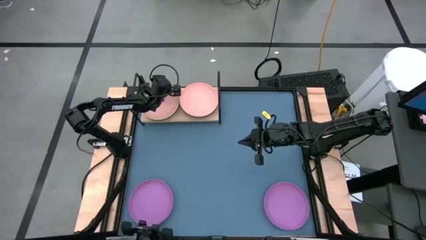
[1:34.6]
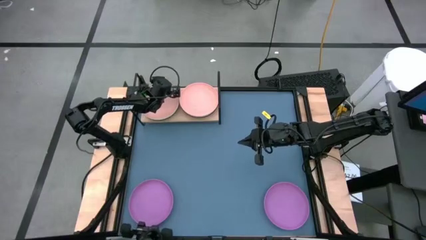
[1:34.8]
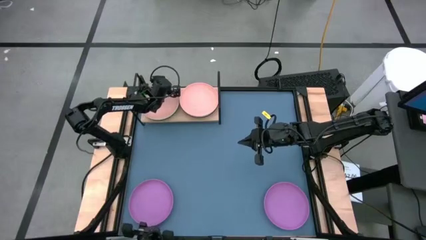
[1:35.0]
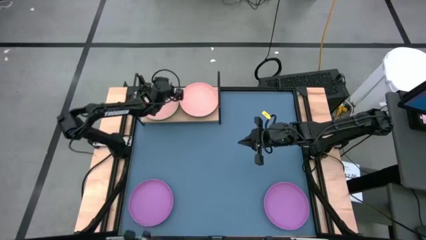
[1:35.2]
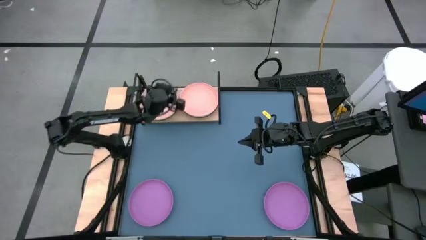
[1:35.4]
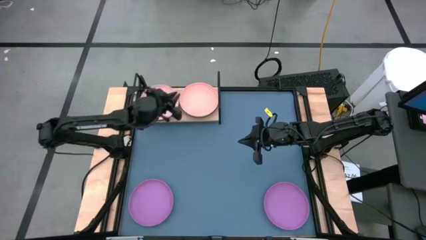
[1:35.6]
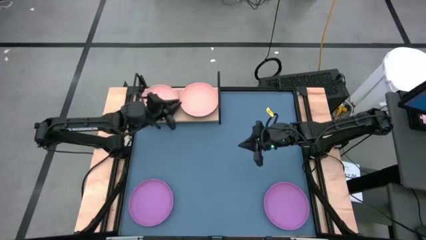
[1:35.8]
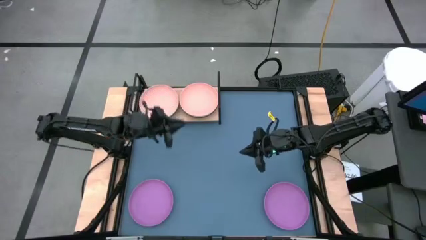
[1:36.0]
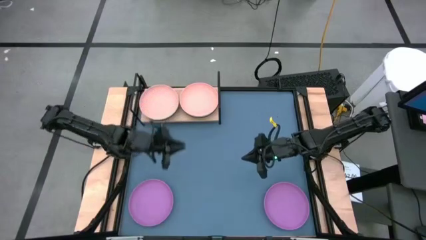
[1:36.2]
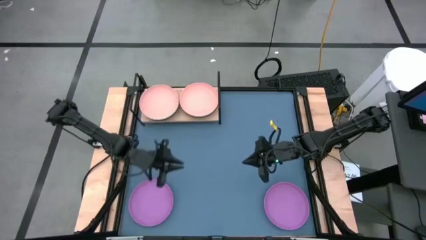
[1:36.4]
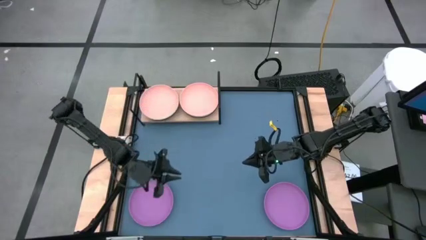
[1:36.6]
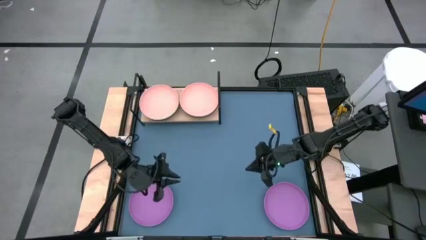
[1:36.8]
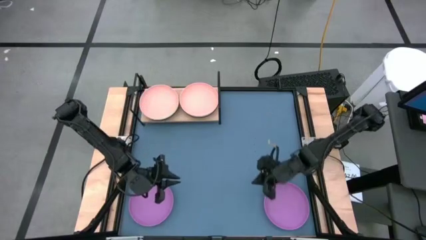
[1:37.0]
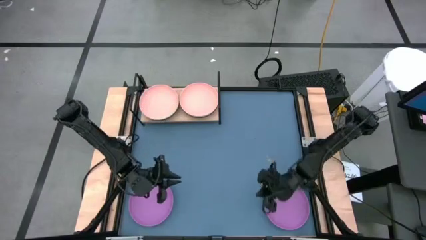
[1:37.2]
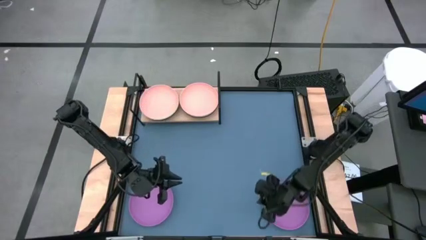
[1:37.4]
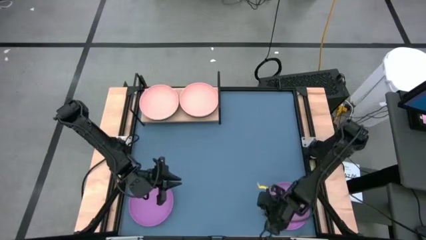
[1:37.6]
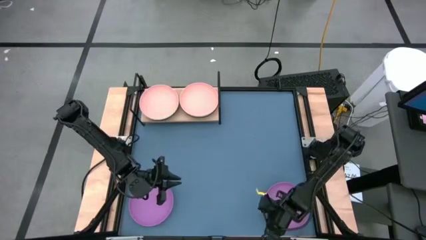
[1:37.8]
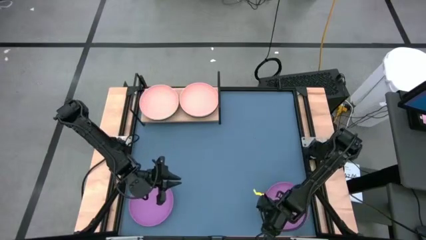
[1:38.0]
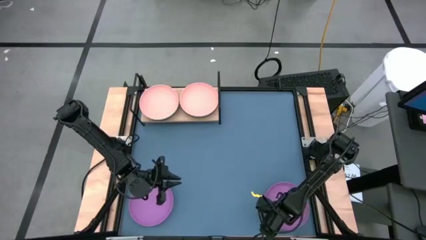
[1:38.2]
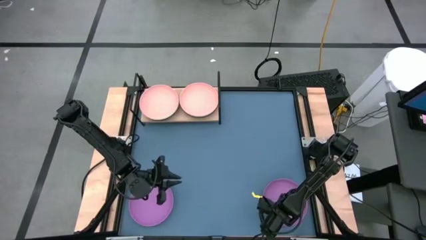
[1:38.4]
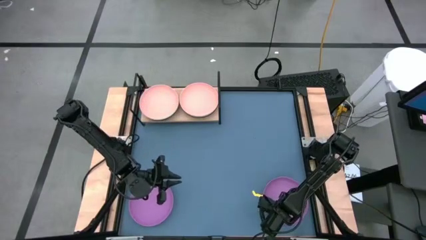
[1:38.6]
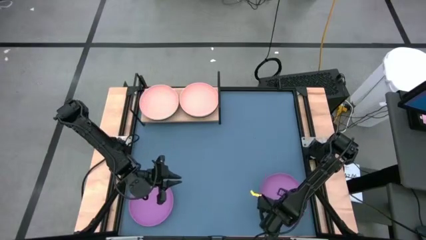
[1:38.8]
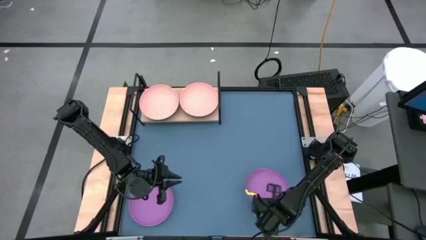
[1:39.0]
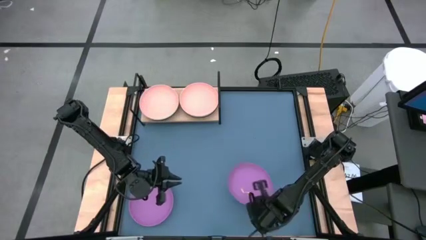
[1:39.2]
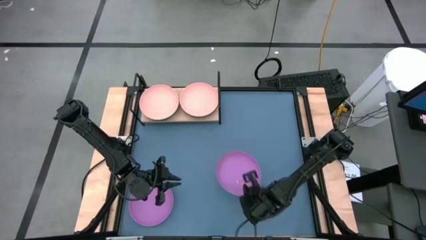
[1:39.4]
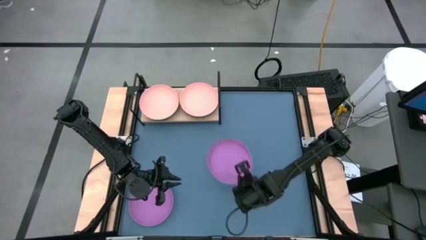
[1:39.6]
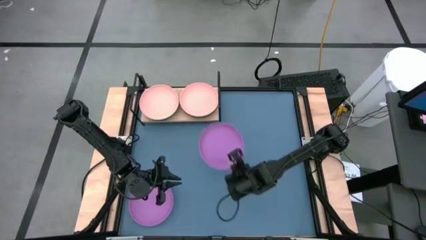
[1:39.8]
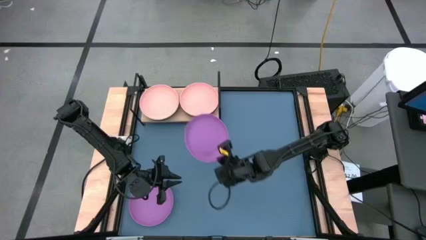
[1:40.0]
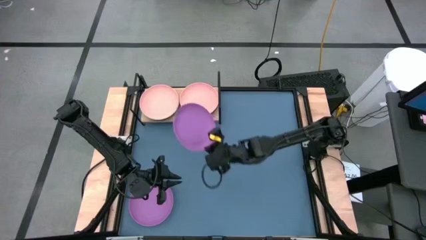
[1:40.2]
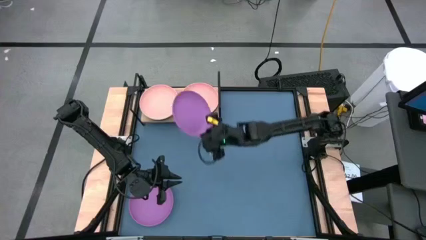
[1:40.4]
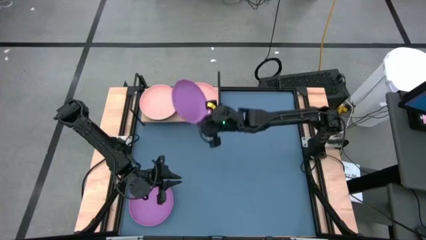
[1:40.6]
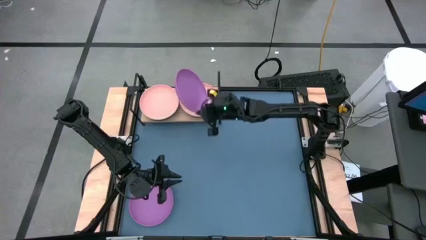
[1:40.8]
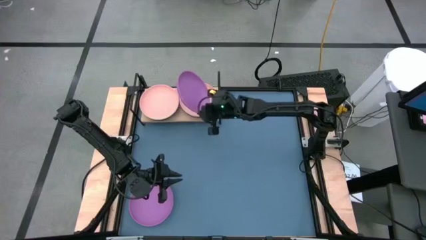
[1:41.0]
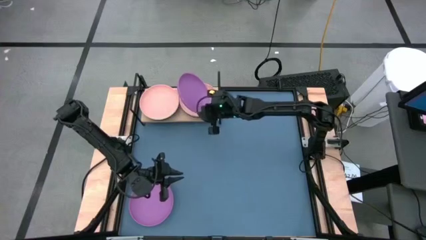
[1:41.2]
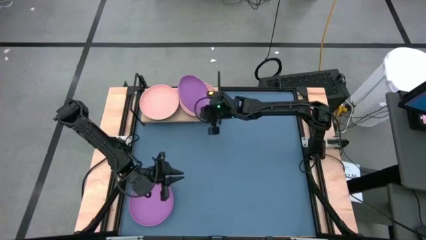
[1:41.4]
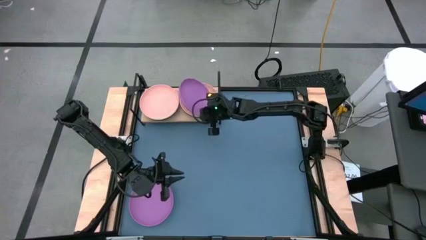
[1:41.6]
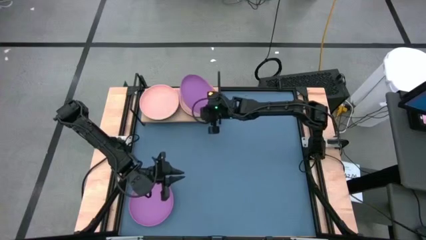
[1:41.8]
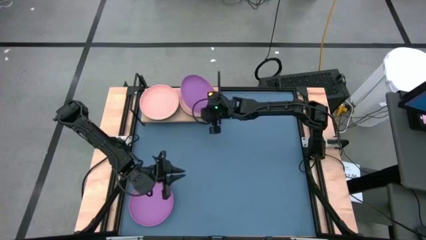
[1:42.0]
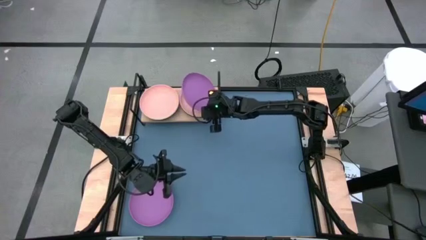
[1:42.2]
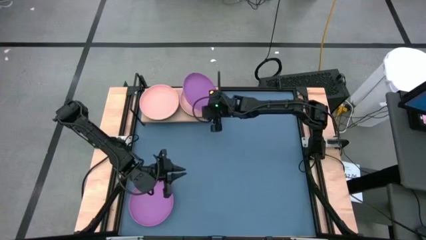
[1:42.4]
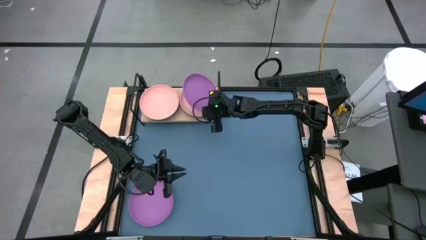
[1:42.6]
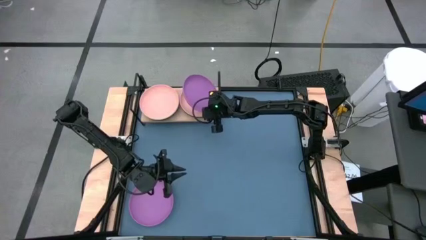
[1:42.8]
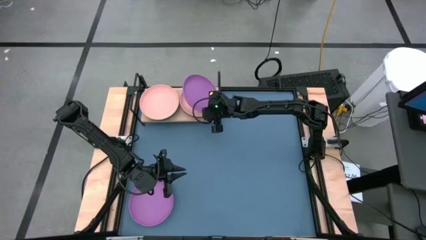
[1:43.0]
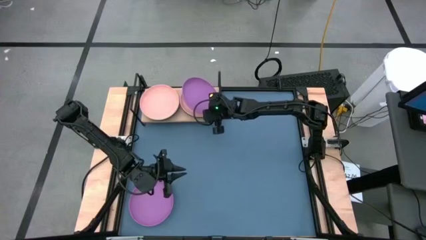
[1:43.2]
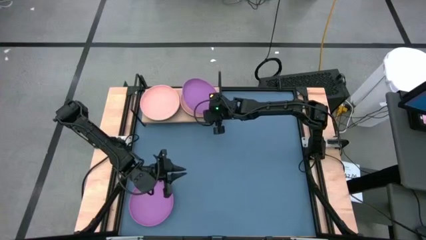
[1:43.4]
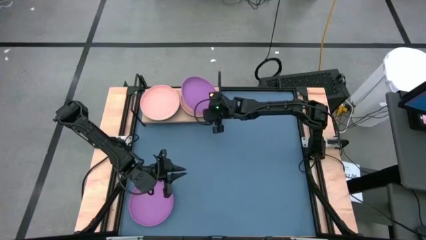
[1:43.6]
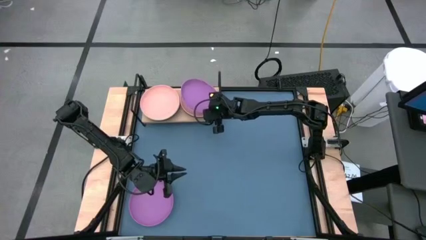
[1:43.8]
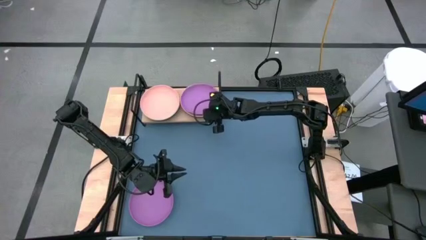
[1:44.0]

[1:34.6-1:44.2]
Task: Place and stack plates onto a shelf
Stack the right purple plate on top of the right light pink plate on the shelf

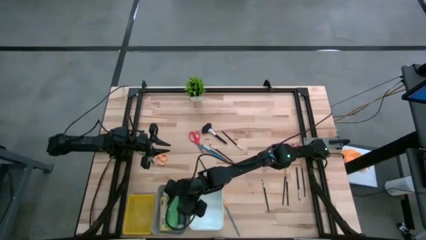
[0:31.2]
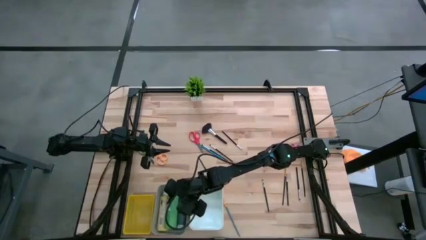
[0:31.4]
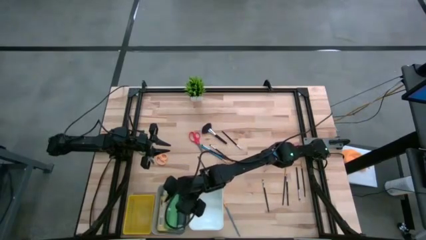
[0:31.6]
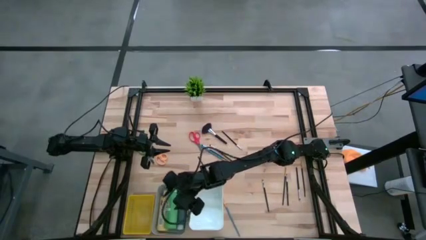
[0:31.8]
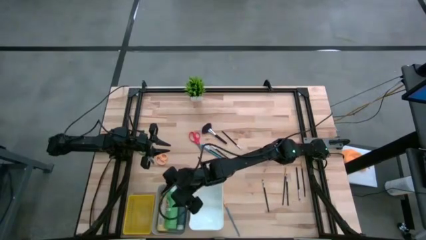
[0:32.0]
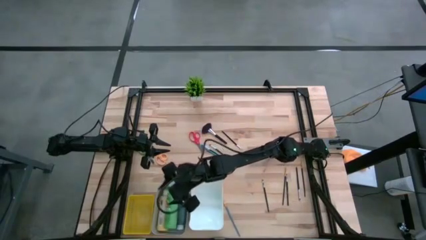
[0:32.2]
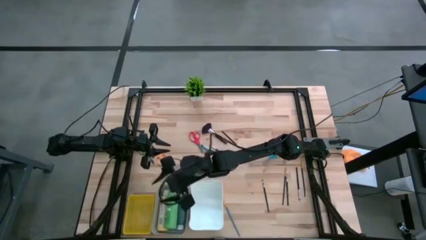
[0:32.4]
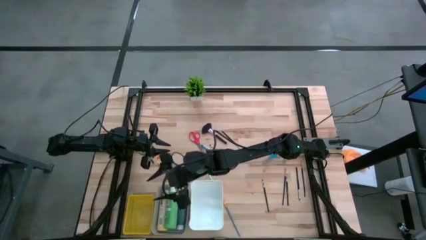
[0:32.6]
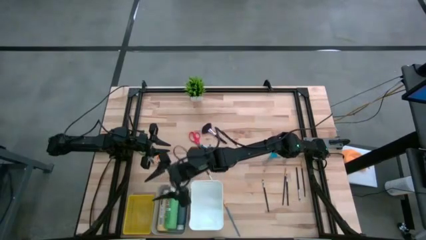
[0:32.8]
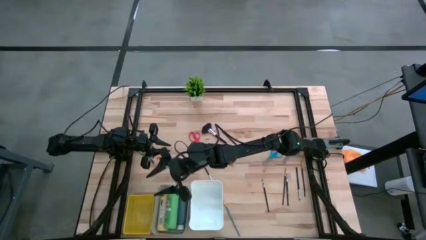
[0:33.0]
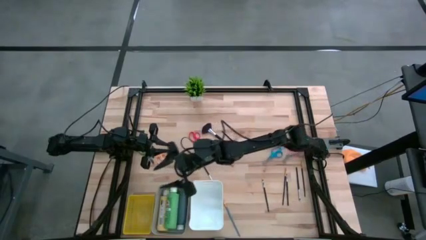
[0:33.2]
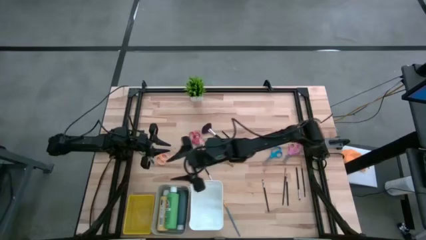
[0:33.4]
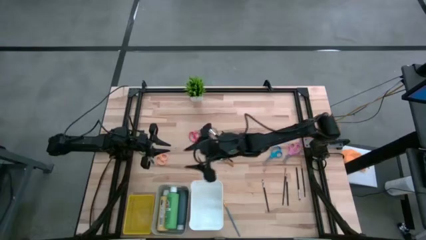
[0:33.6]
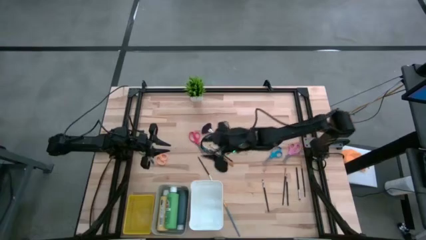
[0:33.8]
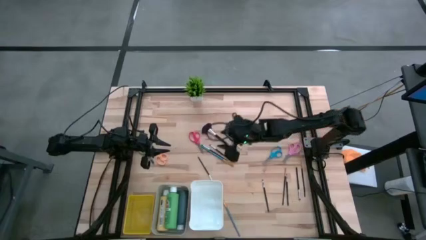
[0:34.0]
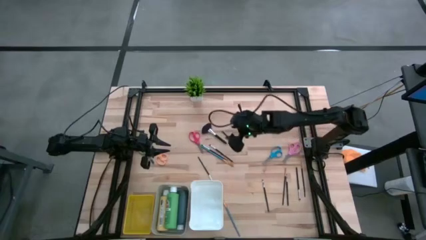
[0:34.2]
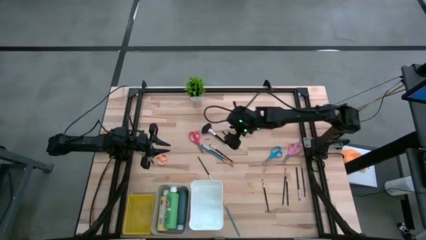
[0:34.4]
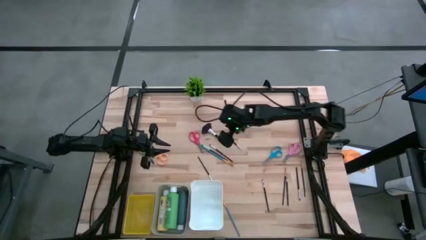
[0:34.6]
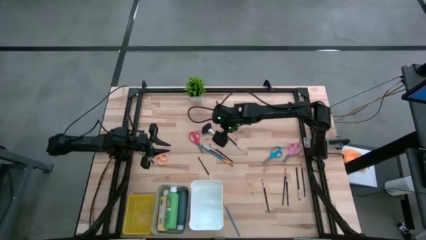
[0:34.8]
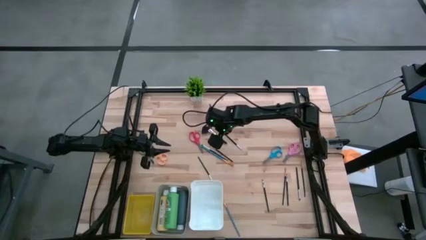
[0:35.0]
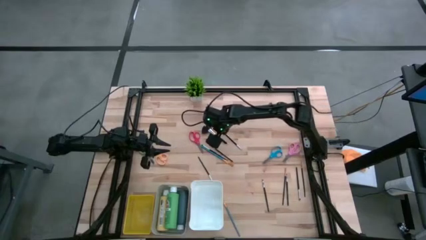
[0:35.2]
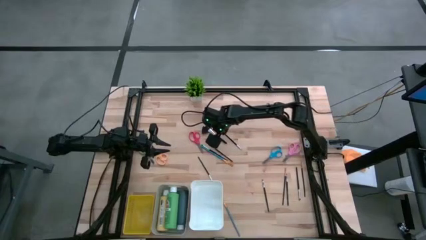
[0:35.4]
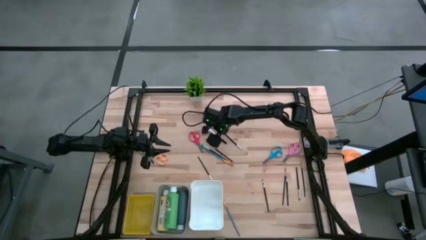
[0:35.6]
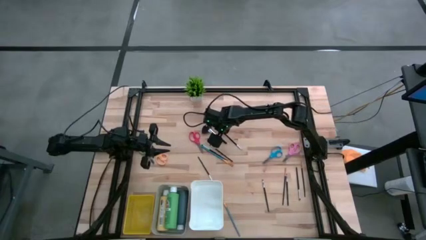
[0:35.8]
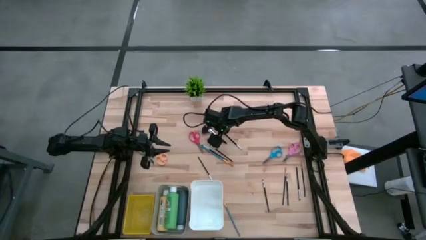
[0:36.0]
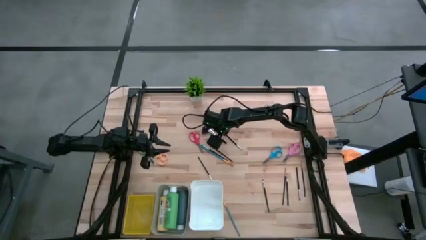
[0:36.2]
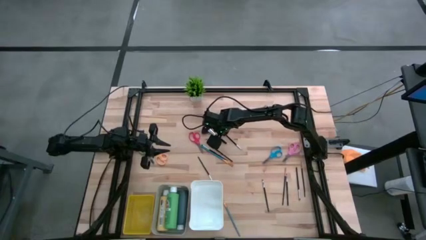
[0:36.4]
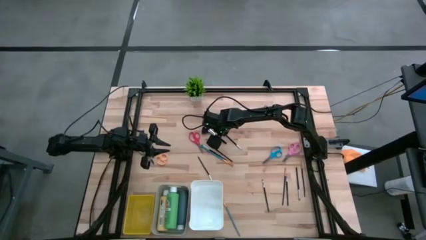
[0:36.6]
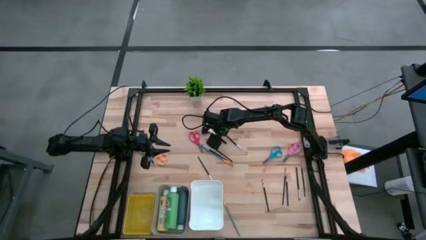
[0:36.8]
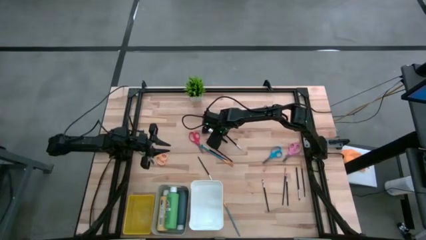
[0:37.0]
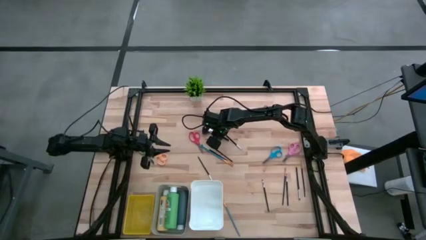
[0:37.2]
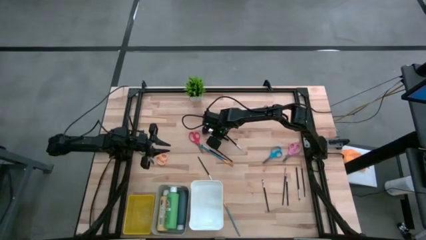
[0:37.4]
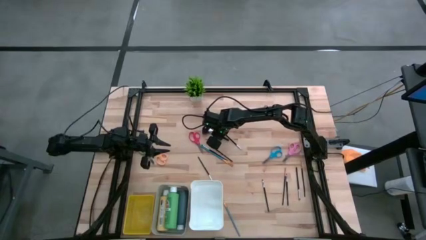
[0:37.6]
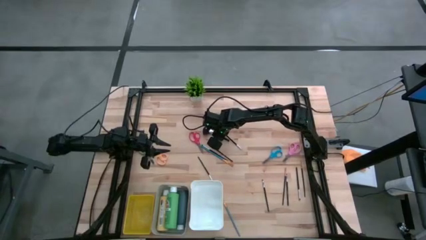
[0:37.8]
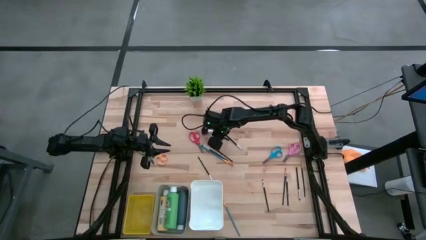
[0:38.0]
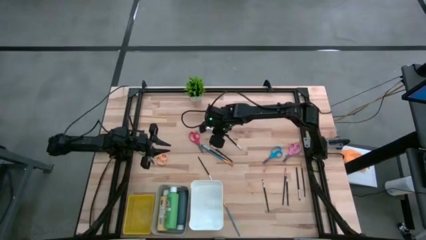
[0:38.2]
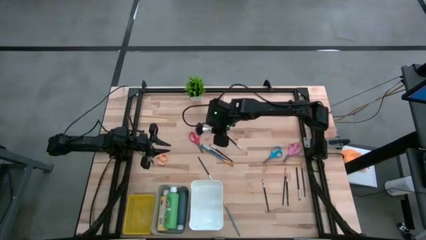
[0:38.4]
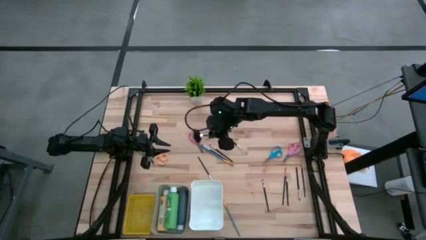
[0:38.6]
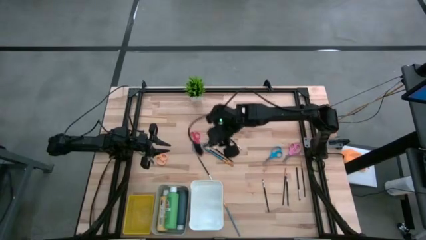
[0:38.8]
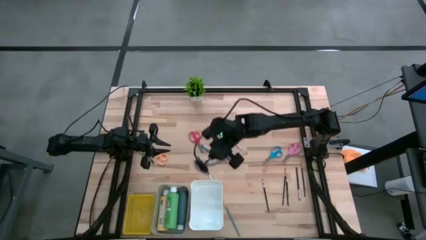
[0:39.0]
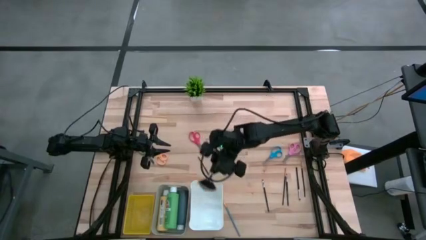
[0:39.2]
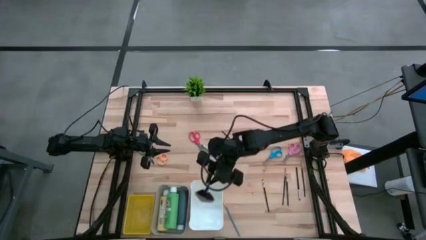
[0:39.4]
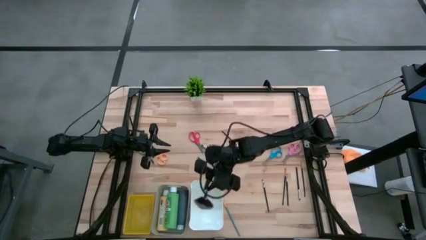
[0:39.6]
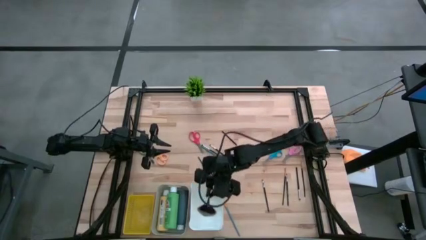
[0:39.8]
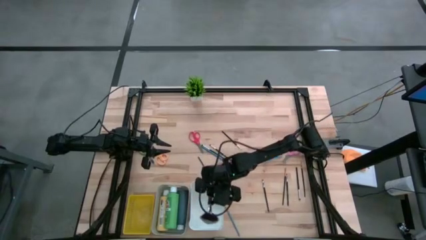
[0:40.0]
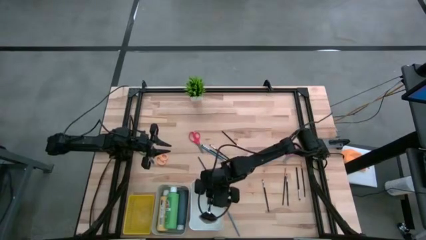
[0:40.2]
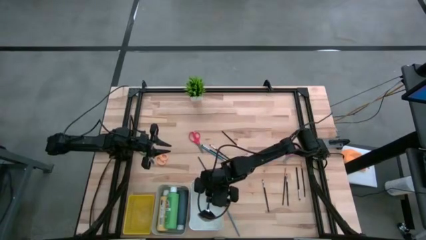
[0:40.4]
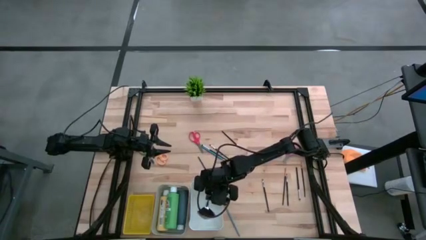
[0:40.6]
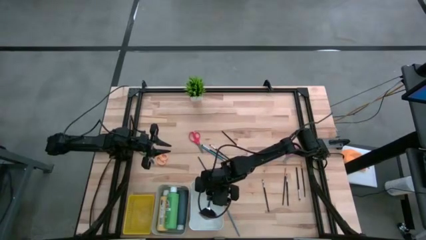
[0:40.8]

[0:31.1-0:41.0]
Task: Pick & Place Paint Supplies
Put the black paint brush into the white bin
